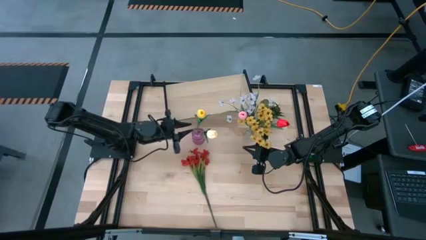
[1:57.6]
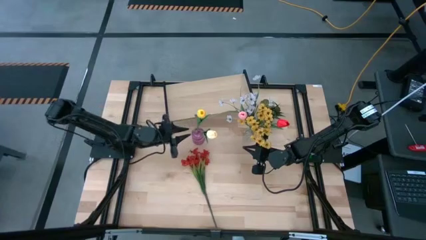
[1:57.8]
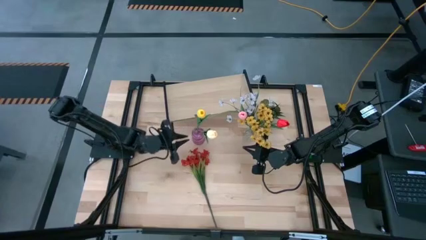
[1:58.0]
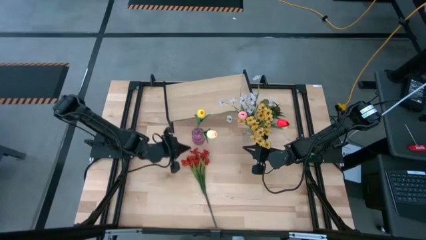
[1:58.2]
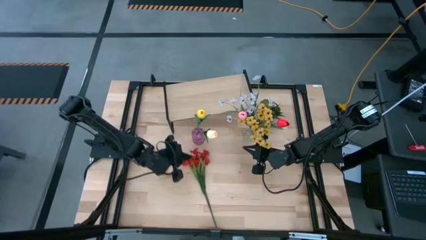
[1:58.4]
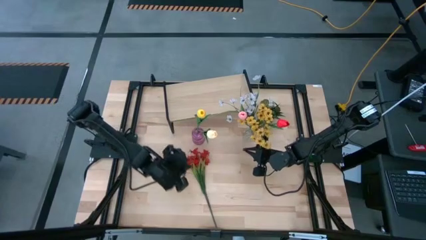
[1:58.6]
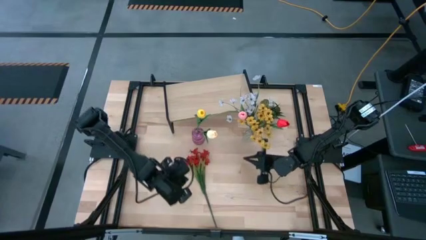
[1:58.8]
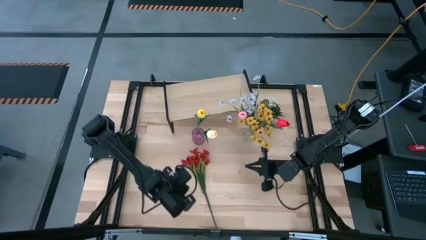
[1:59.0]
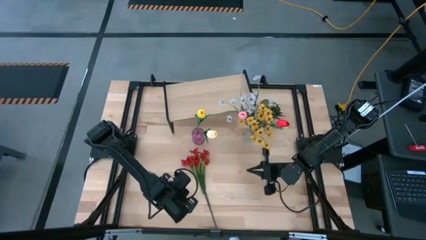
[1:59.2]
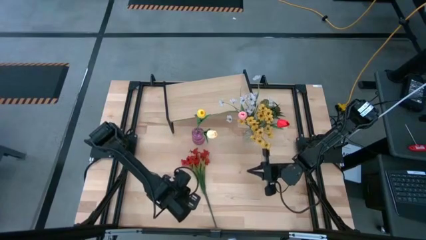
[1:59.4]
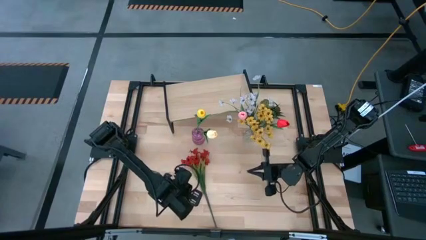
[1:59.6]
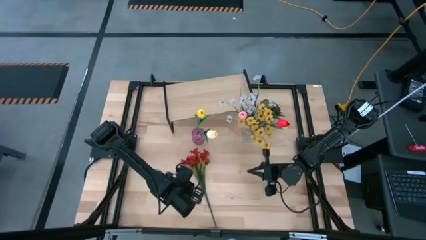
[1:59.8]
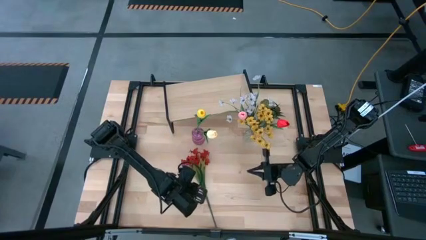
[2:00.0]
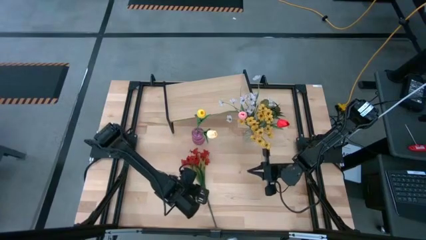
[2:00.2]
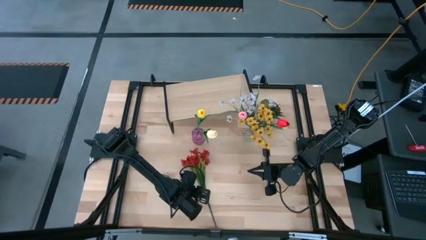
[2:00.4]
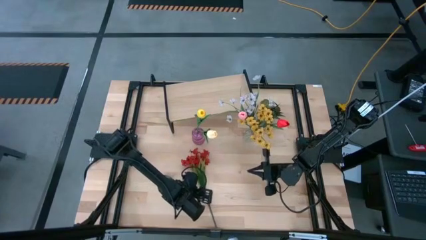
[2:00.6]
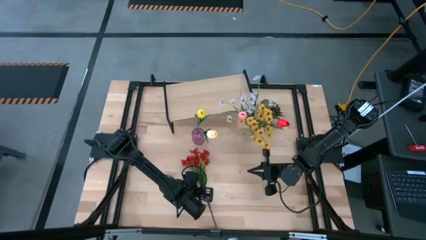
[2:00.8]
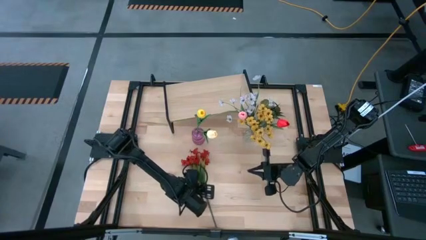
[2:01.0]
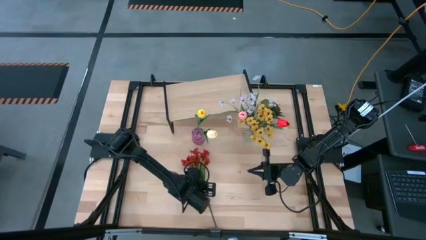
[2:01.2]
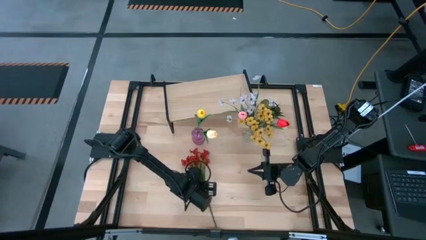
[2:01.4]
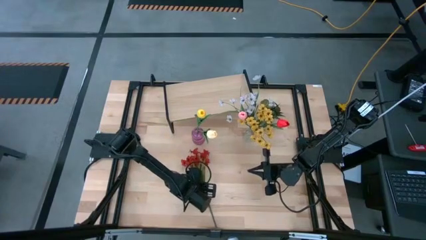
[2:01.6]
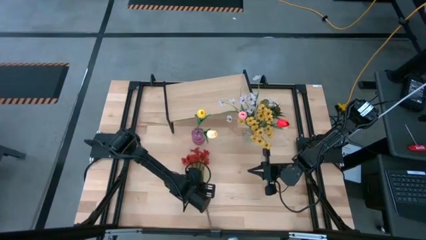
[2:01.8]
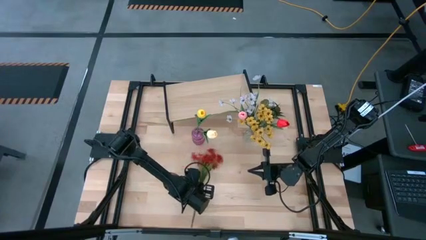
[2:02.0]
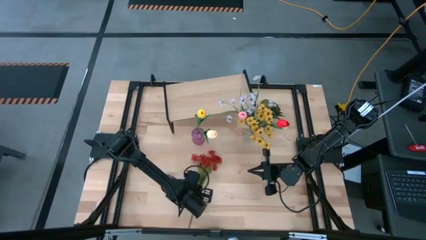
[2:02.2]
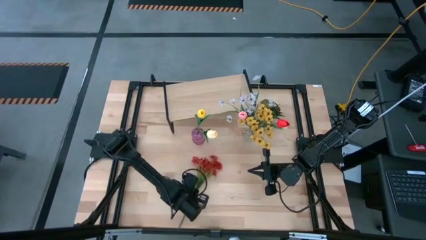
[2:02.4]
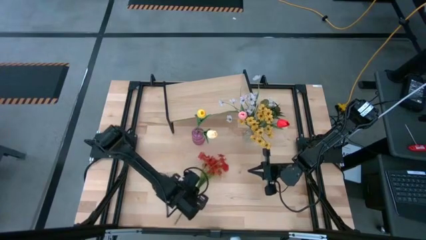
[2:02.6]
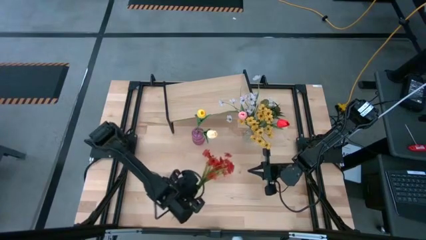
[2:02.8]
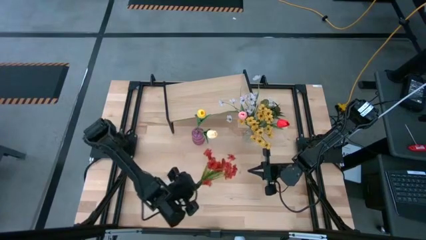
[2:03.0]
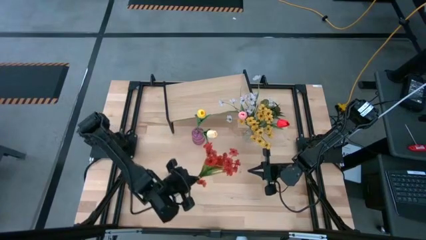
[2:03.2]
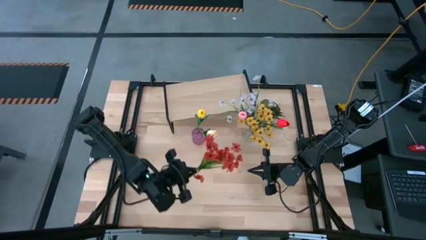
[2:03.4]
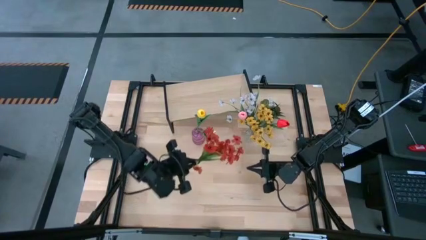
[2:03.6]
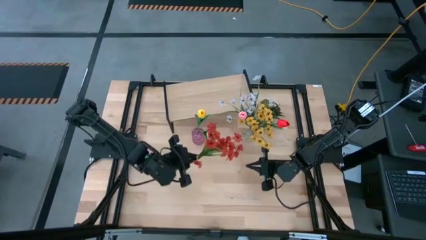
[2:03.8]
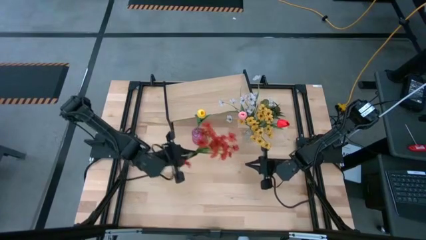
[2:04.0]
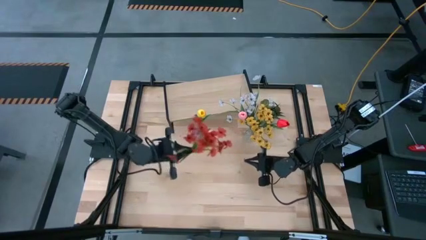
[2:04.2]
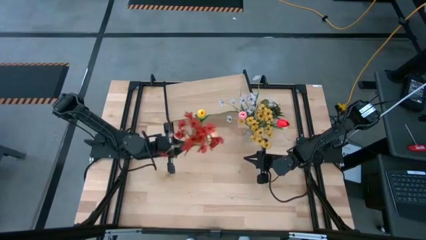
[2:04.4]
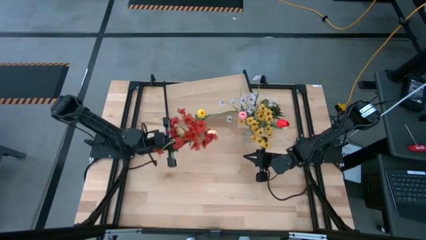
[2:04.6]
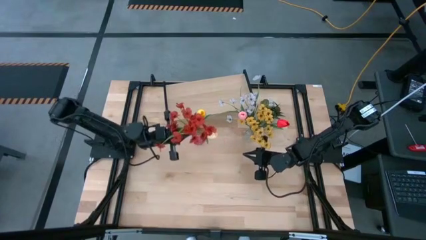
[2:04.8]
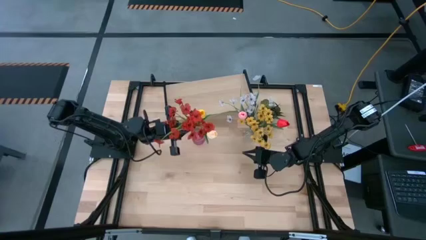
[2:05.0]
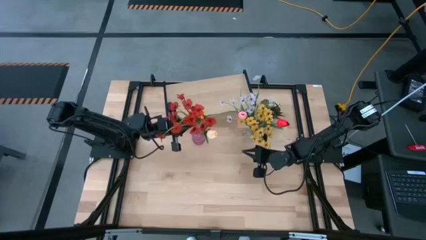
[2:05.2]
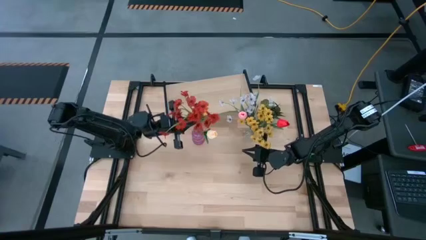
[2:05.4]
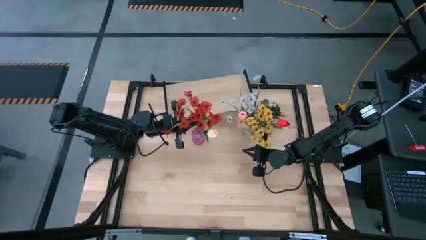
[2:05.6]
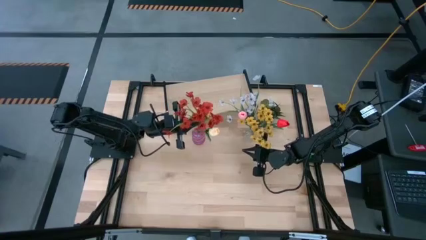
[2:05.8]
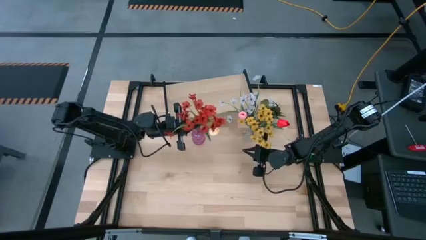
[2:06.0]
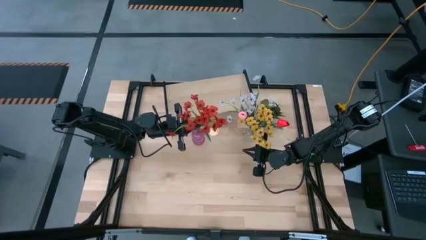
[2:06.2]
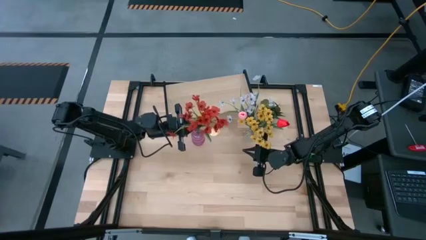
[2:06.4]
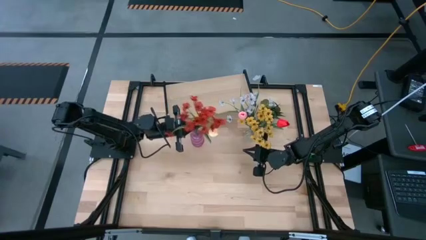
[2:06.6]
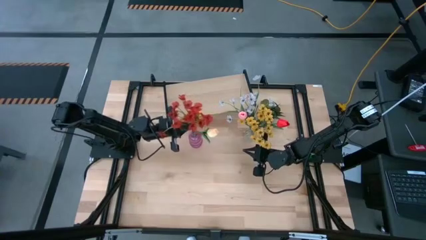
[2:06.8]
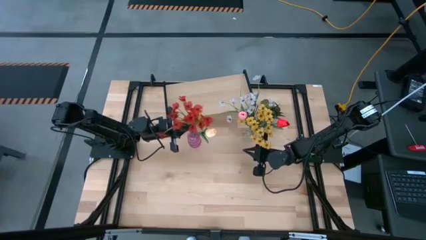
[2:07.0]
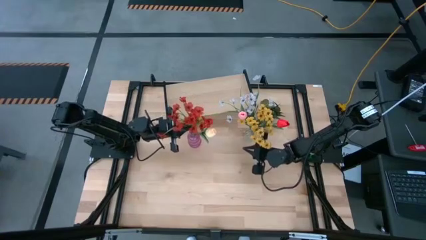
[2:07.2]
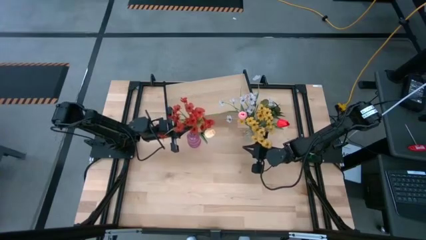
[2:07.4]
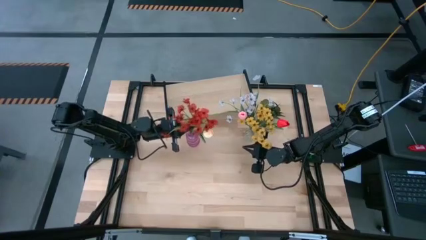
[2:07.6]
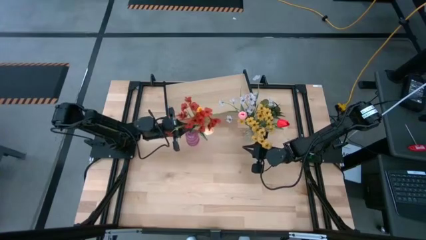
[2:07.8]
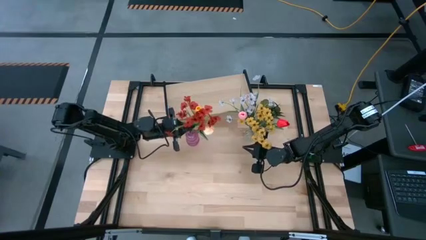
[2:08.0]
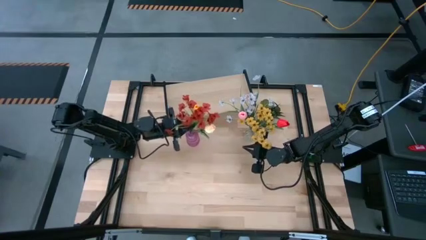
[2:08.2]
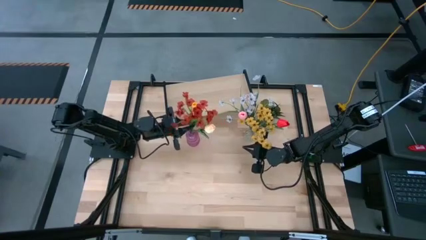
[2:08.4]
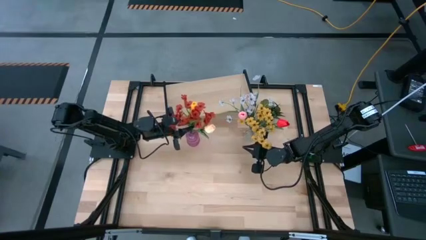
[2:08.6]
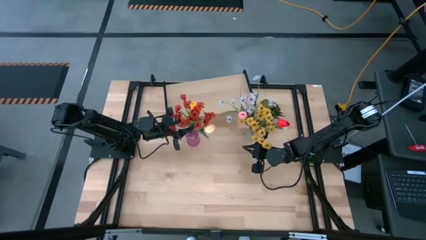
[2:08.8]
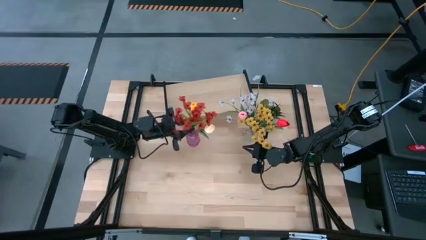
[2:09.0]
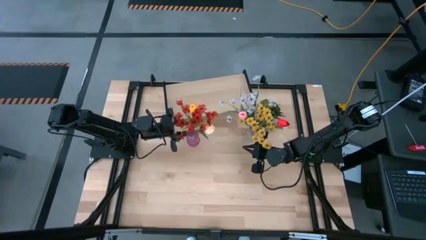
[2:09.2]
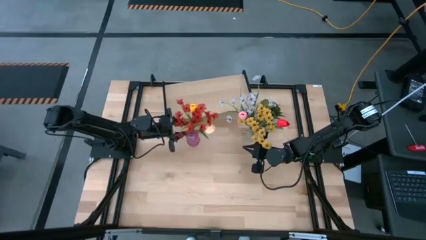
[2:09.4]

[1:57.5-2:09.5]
Task: Pick and place flowers into a vace then onto a shelf
Put the red flowers into the pink vase

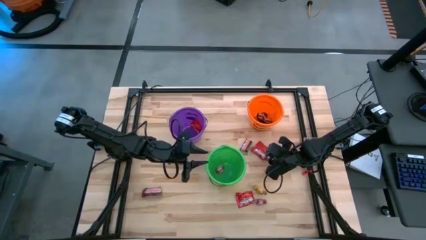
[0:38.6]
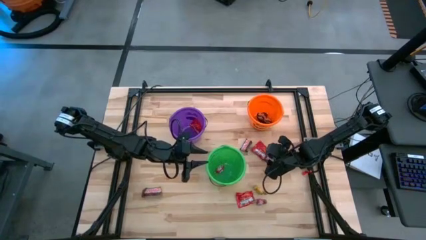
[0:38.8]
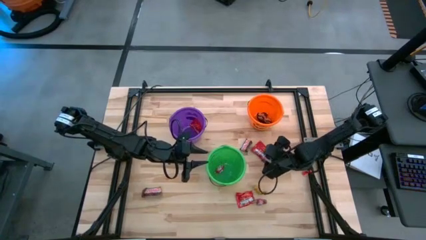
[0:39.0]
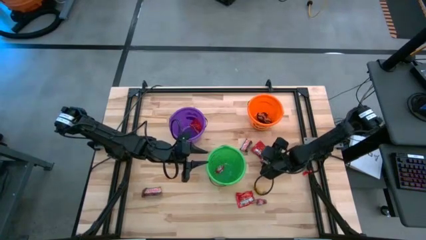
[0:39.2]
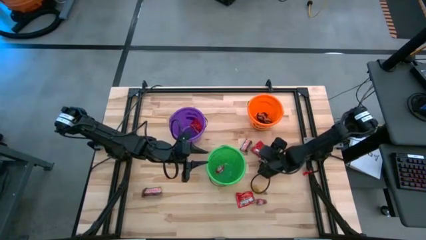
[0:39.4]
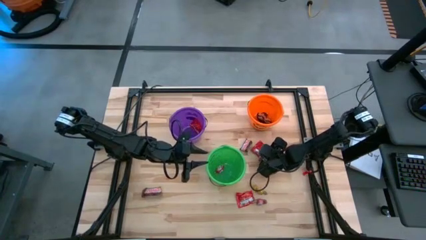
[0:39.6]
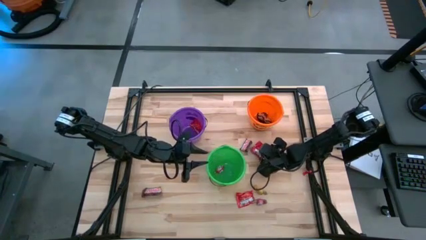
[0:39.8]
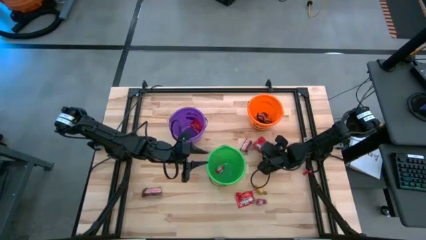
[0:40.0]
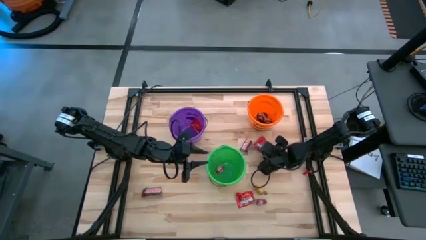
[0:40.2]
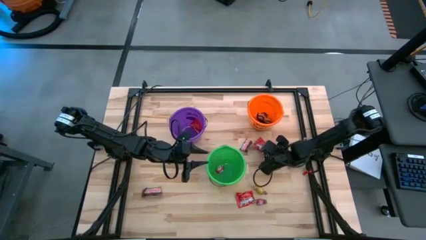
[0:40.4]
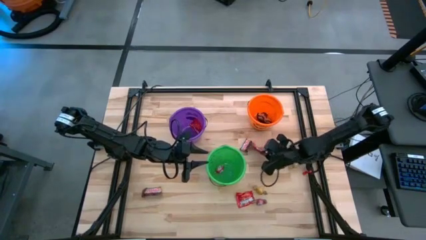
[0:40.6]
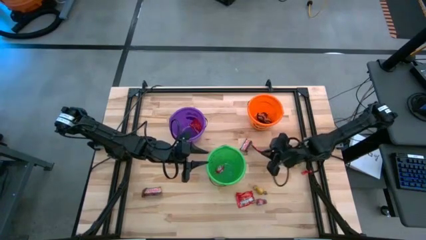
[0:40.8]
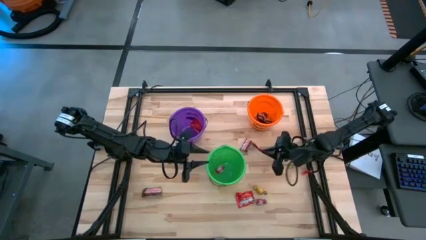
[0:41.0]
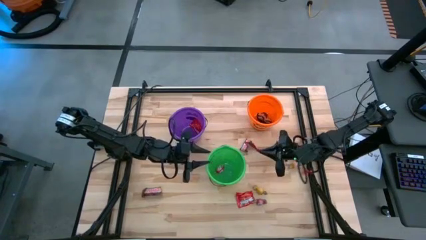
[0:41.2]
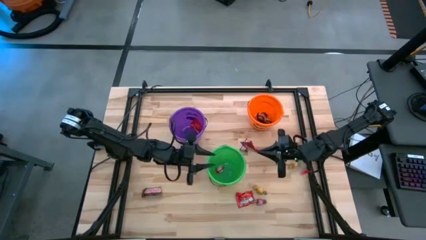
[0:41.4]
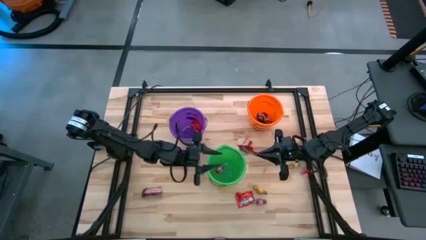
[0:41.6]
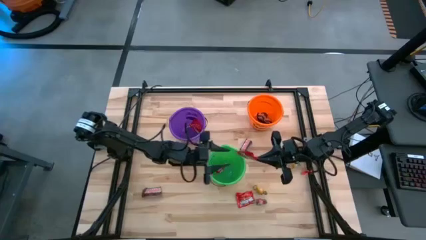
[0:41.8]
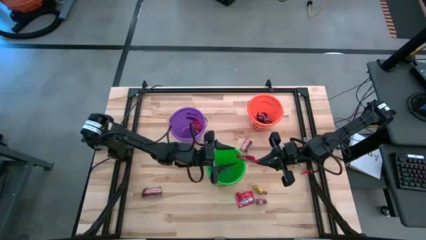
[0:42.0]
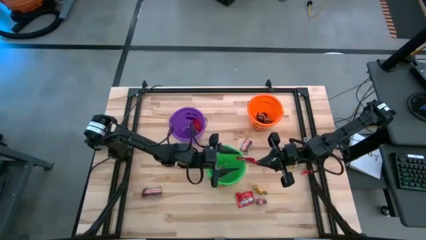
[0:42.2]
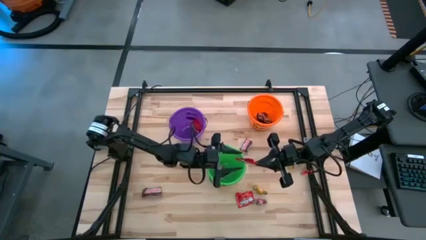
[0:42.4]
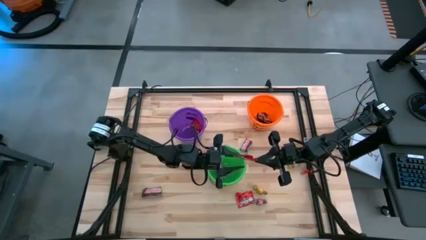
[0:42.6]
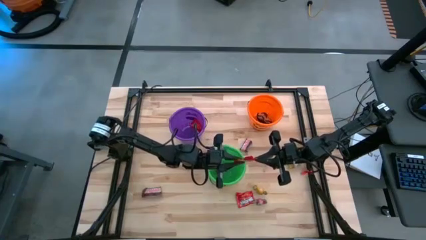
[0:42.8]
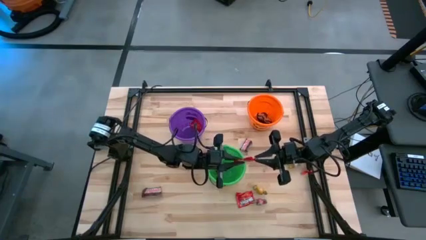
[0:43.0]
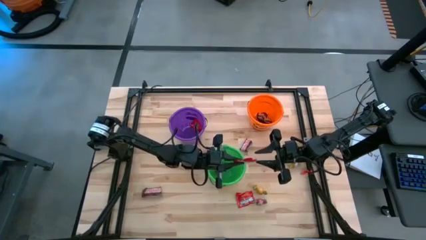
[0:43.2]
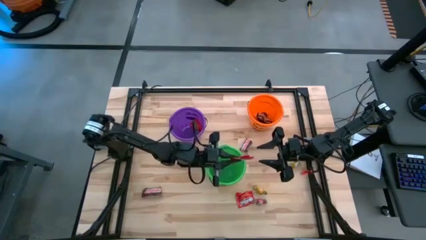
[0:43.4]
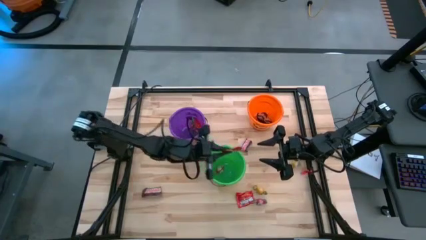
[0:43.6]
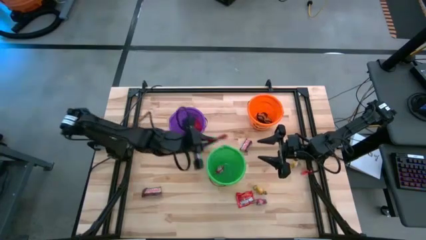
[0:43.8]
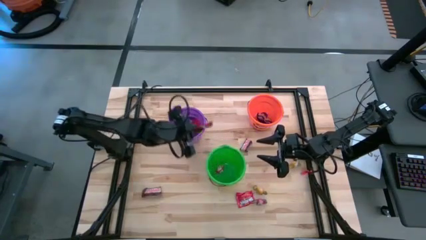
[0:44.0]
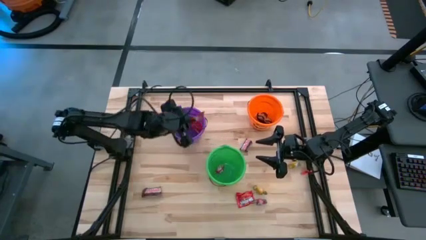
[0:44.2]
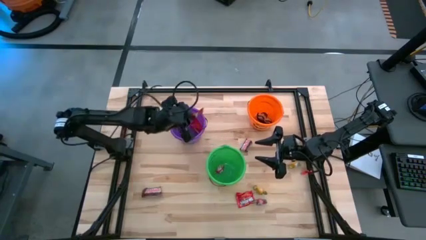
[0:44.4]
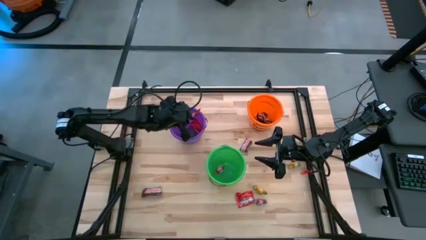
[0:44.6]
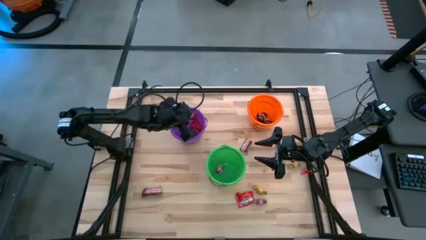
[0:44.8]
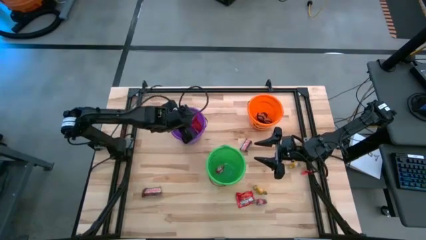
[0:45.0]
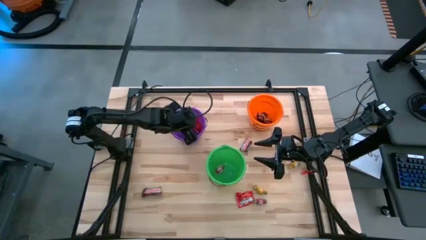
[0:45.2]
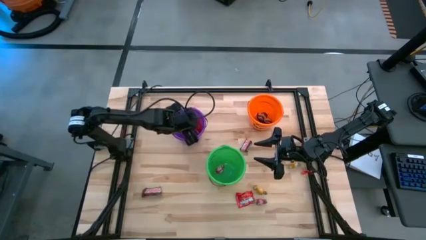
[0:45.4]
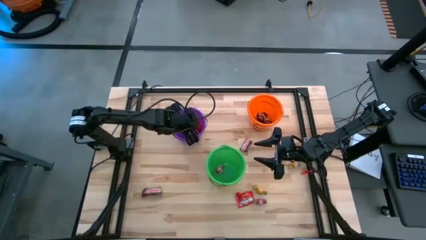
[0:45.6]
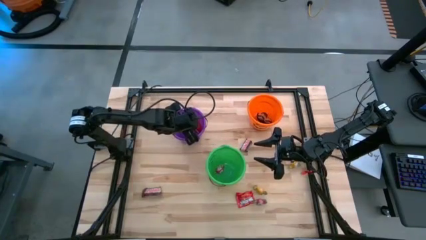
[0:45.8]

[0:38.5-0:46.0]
Task: Organize candy in baskets
Put the red candy into the purple bucket
